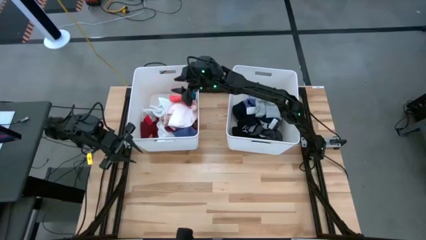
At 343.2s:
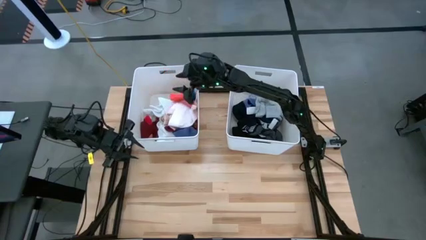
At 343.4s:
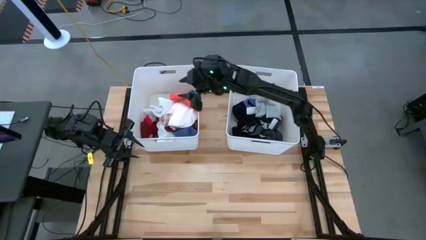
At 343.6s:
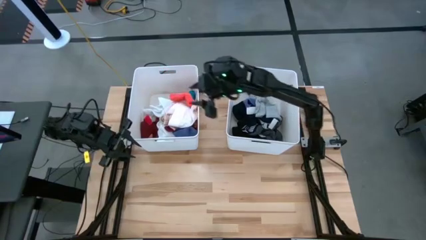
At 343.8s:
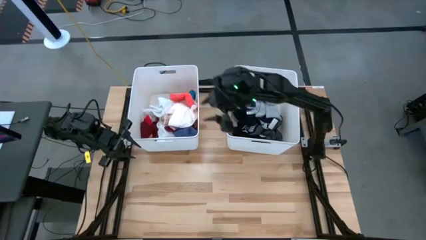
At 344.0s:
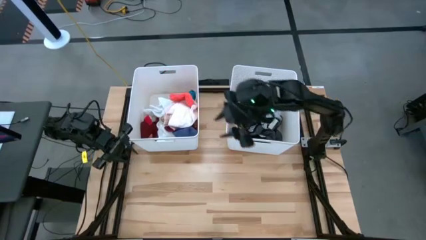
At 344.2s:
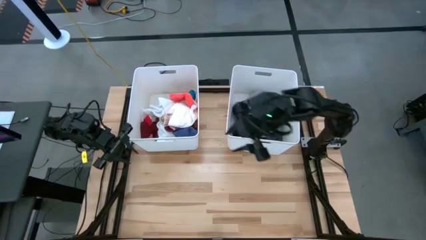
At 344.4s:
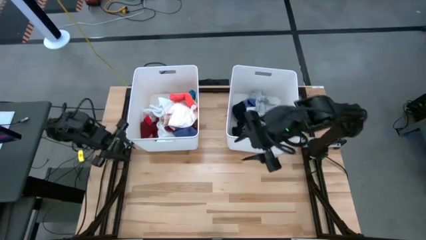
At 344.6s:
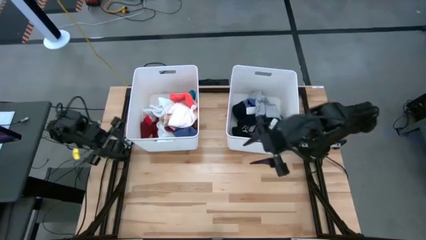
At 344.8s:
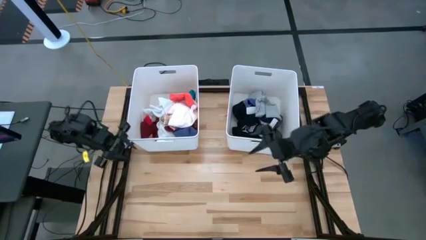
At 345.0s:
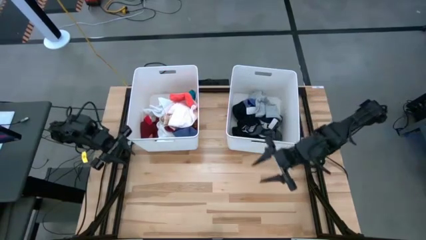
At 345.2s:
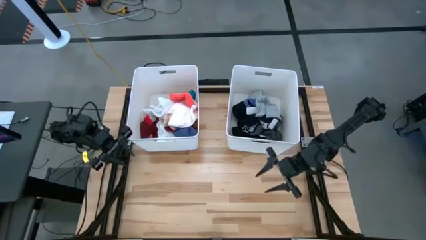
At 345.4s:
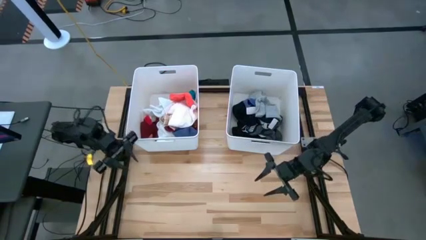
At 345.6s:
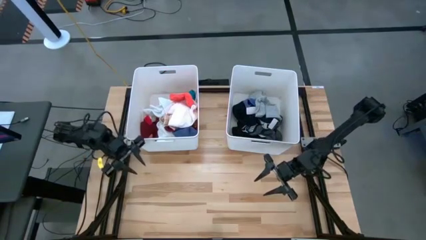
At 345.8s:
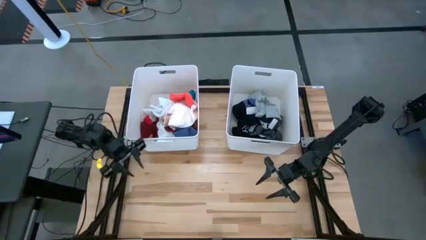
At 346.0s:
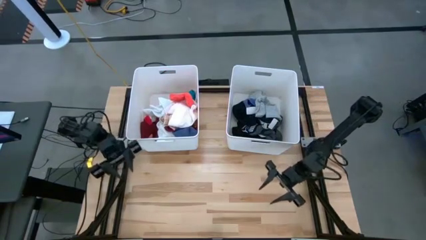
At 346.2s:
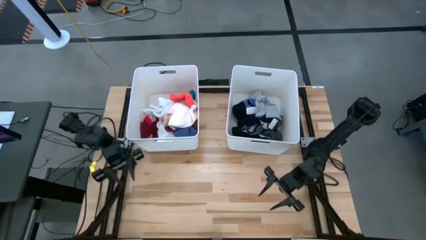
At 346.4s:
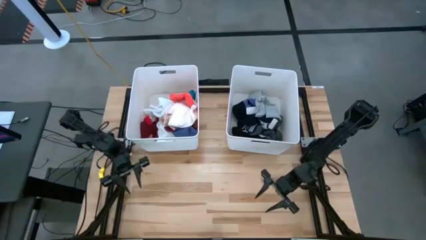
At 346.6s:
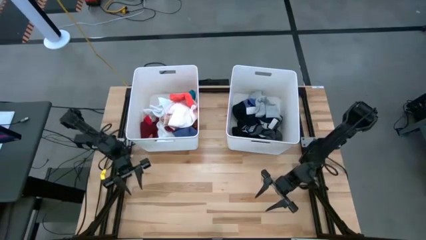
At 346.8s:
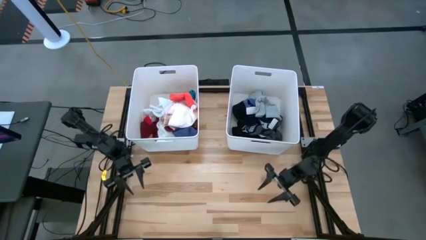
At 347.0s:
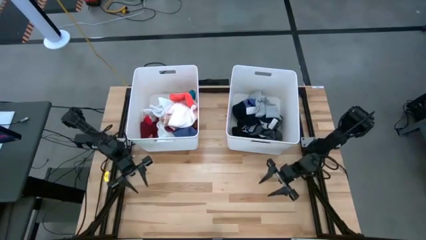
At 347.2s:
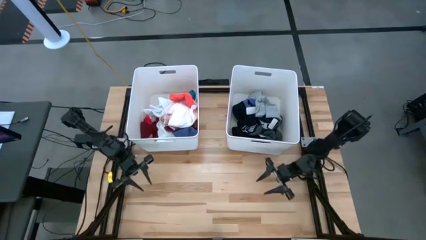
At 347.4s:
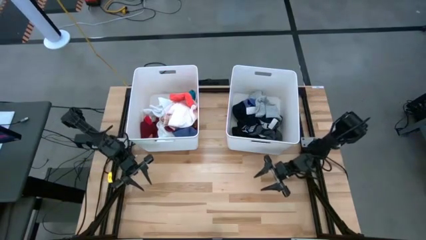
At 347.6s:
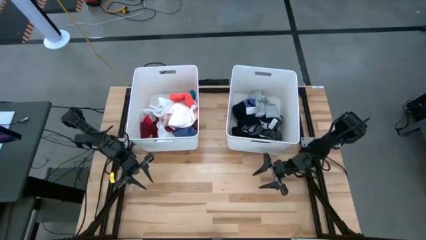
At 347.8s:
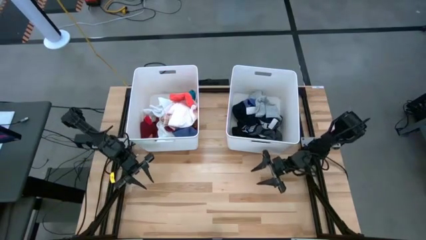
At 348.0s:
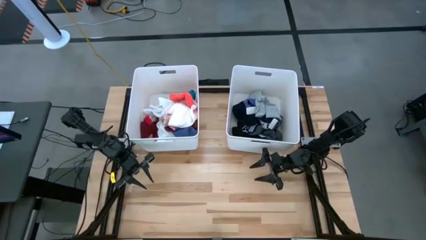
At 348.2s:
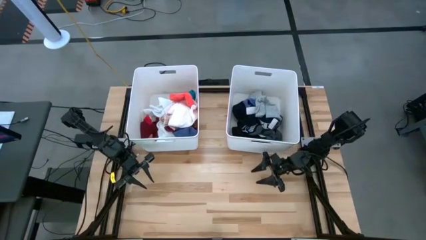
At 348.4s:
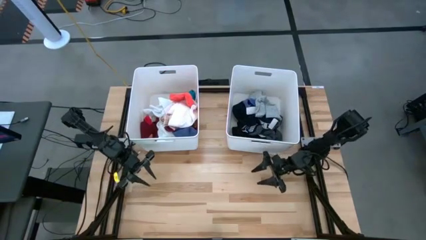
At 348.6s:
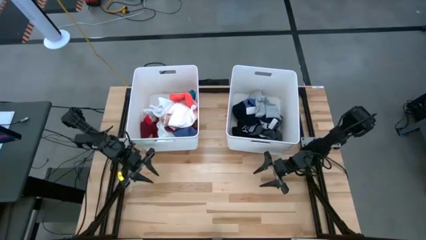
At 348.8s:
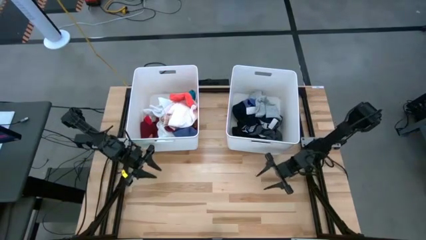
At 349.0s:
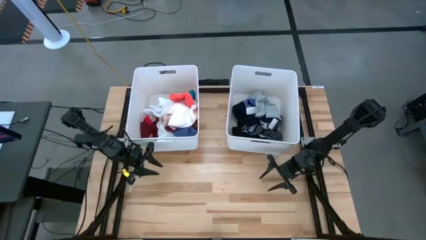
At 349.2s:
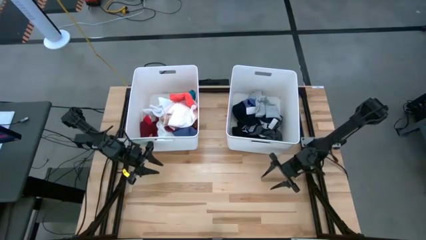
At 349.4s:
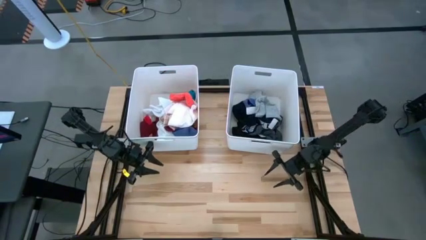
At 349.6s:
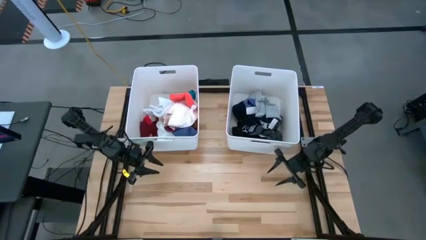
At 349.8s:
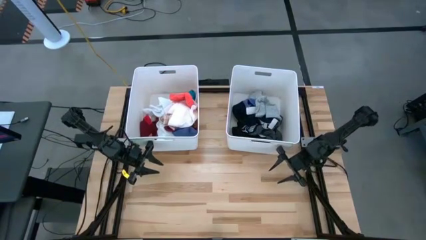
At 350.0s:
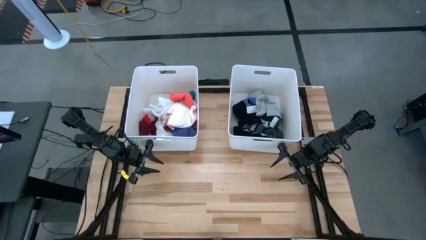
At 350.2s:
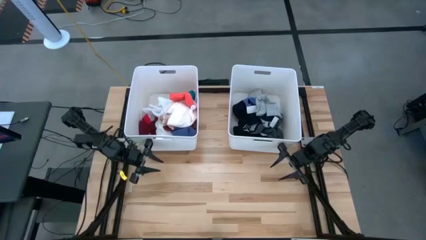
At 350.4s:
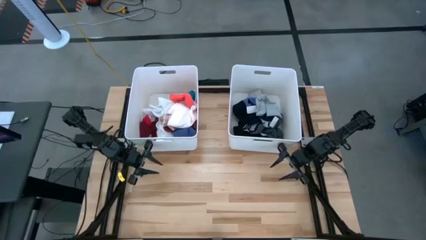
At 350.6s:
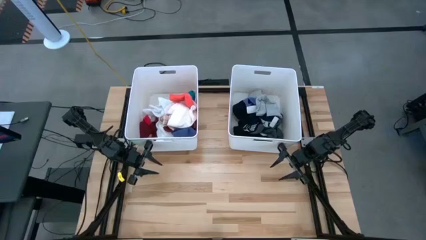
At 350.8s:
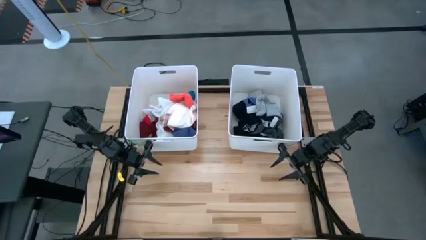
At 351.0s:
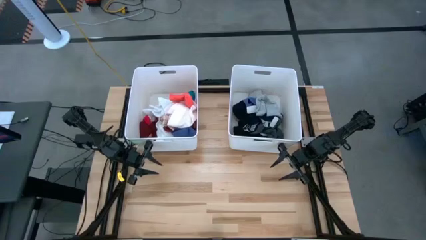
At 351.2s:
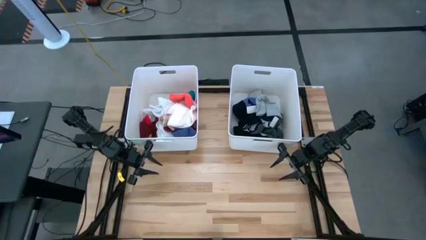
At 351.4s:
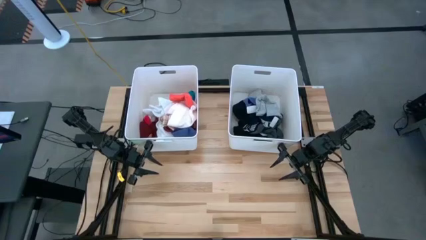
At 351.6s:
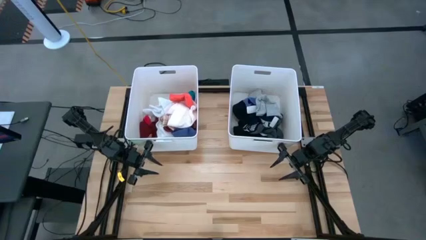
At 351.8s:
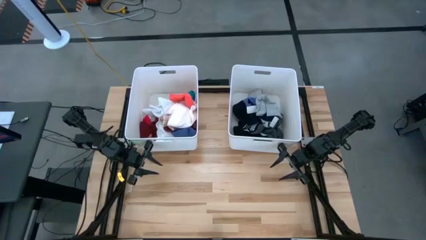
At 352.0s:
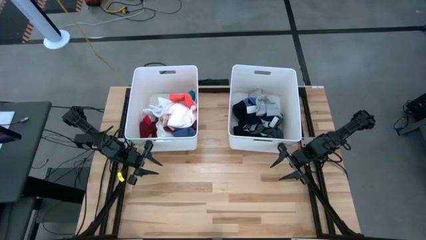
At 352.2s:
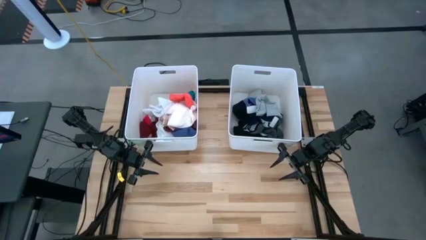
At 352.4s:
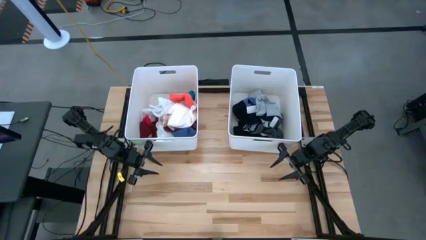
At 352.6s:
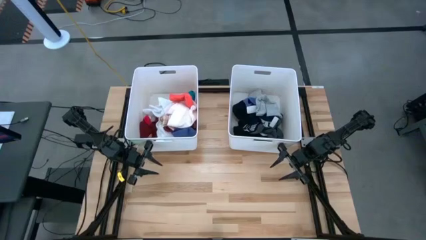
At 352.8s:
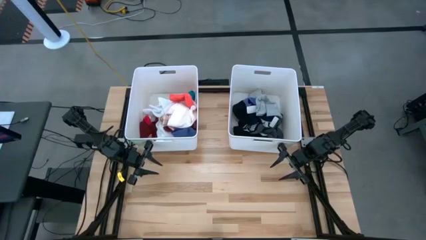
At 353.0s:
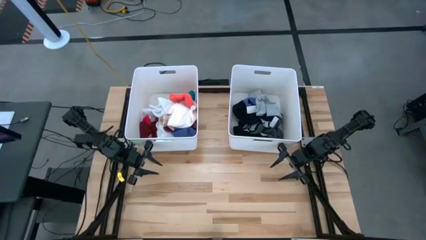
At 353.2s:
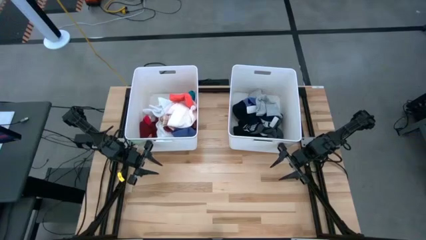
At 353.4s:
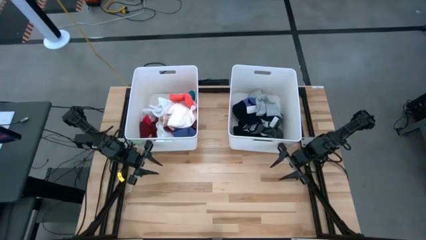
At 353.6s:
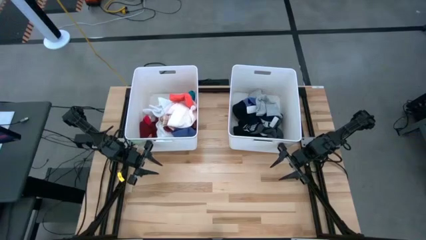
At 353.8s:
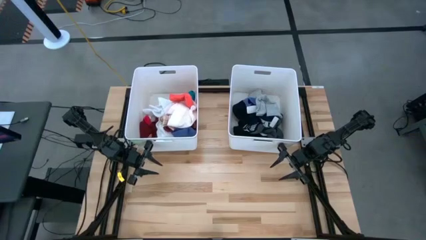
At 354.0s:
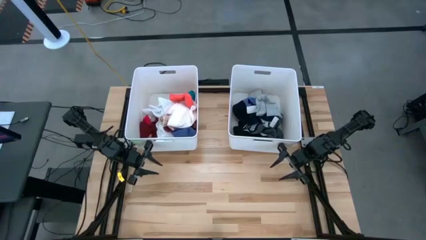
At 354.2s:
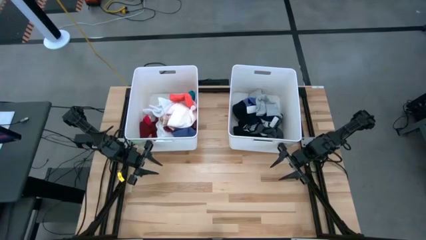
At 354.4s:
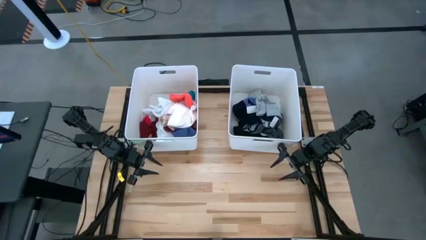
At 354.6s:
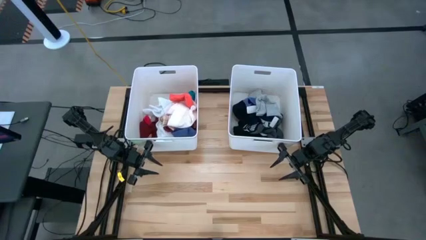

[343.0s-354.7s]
Task: Sort clothes
Return to home position
